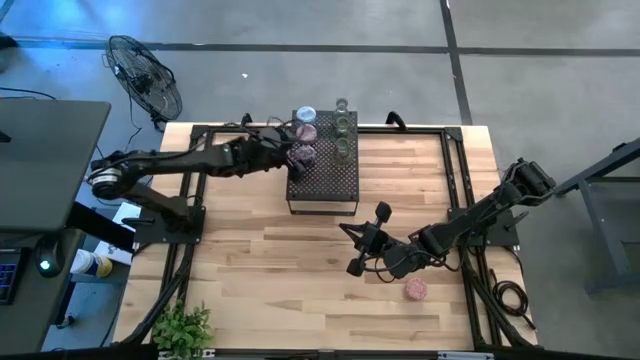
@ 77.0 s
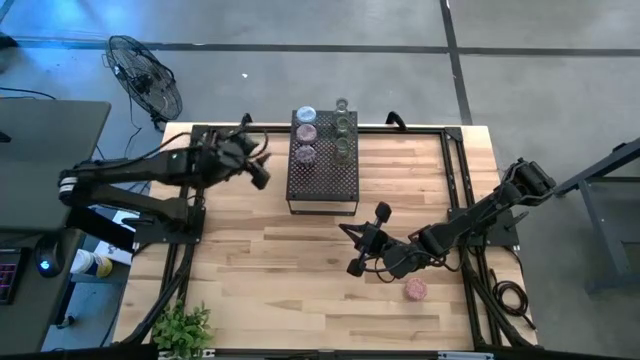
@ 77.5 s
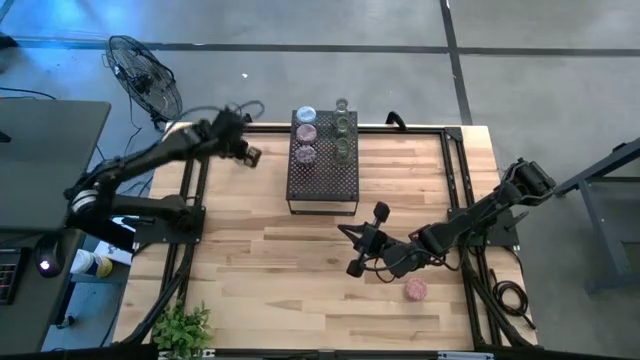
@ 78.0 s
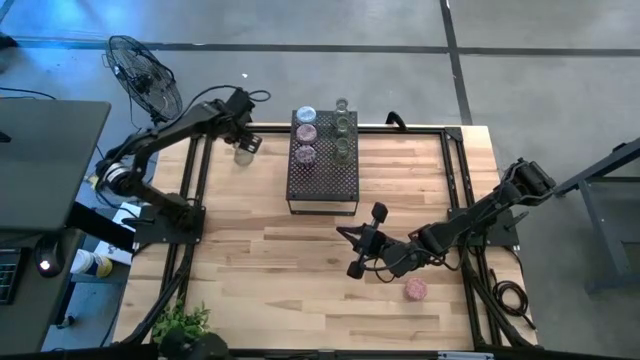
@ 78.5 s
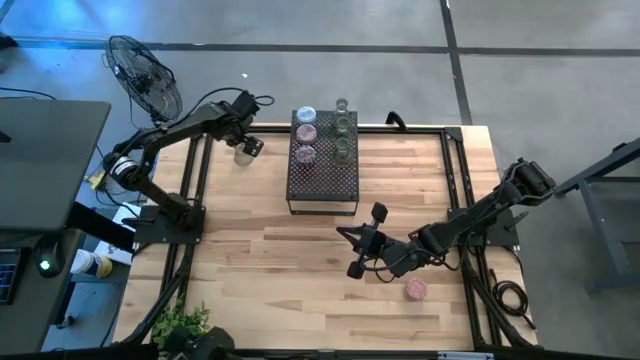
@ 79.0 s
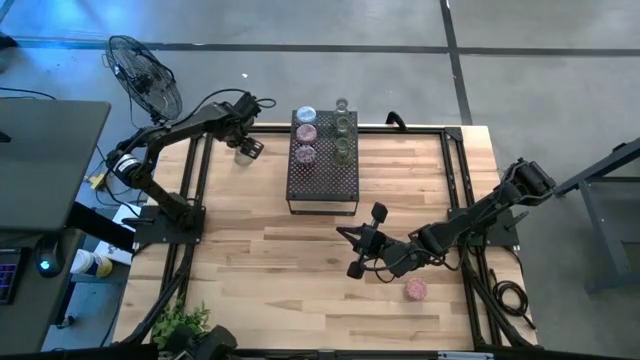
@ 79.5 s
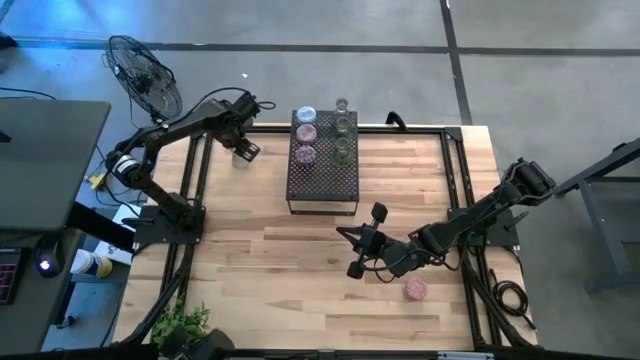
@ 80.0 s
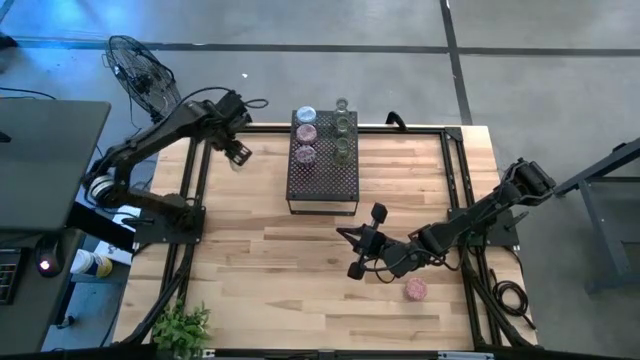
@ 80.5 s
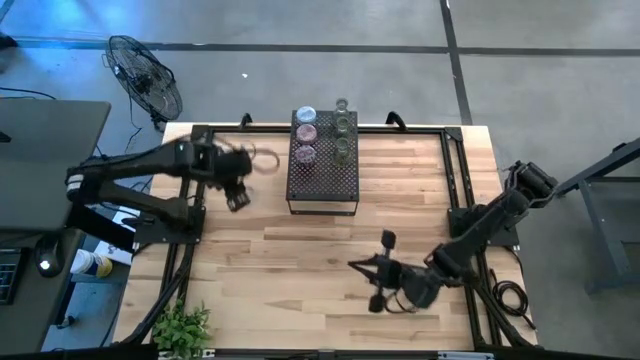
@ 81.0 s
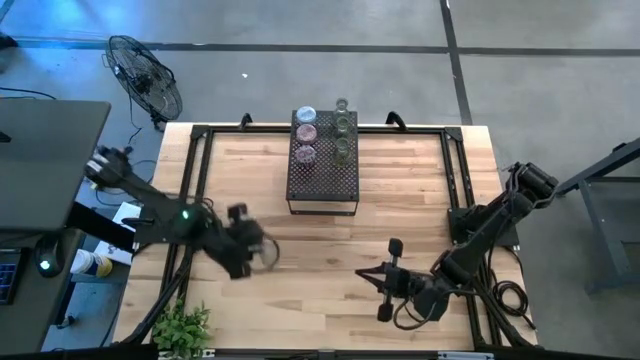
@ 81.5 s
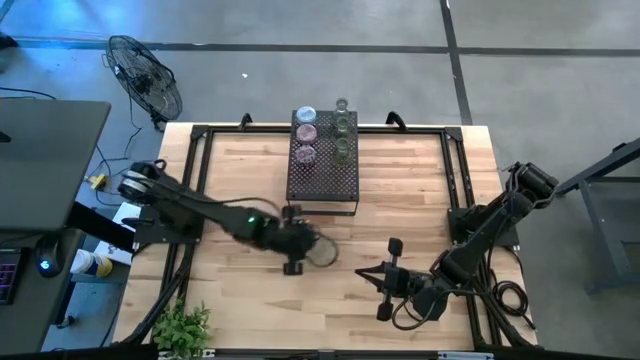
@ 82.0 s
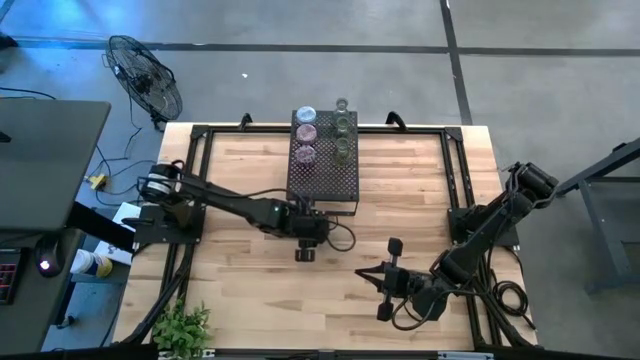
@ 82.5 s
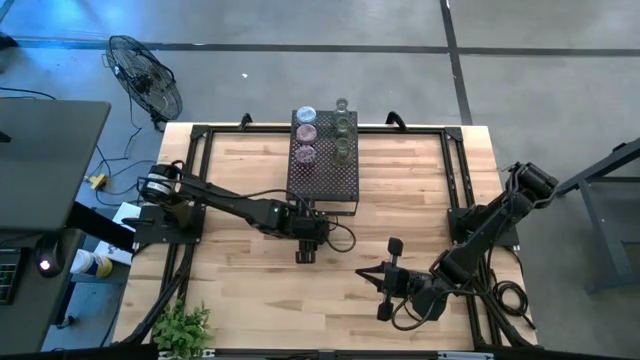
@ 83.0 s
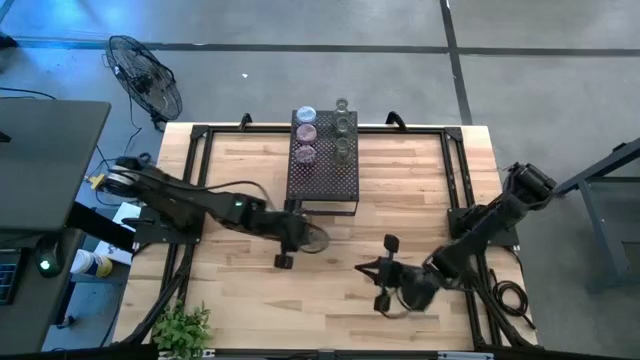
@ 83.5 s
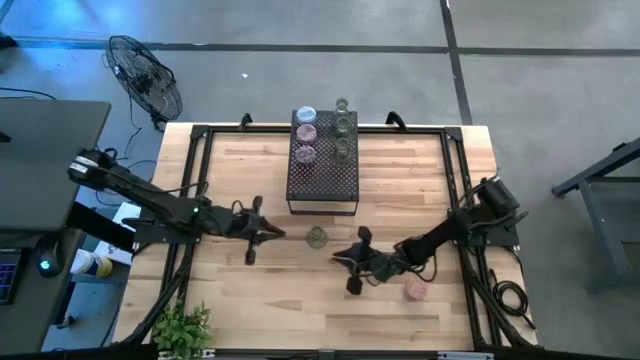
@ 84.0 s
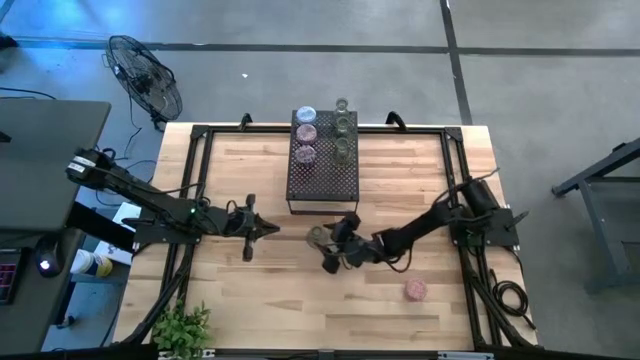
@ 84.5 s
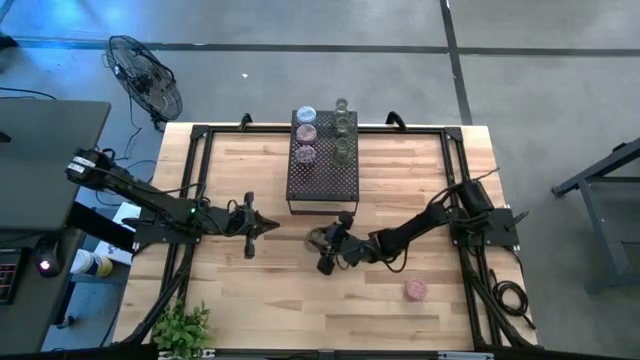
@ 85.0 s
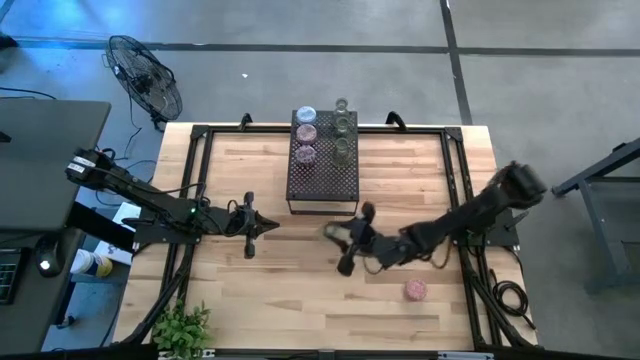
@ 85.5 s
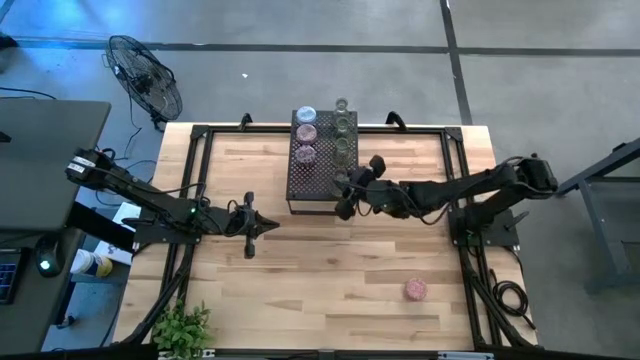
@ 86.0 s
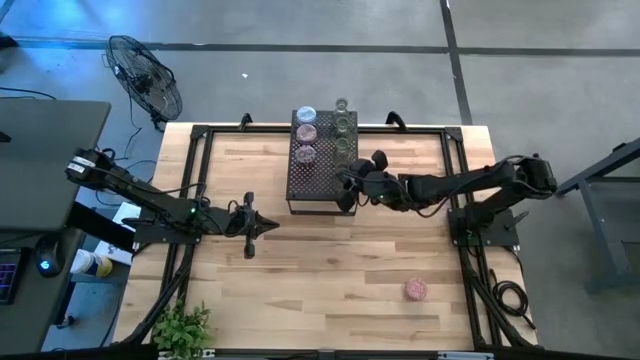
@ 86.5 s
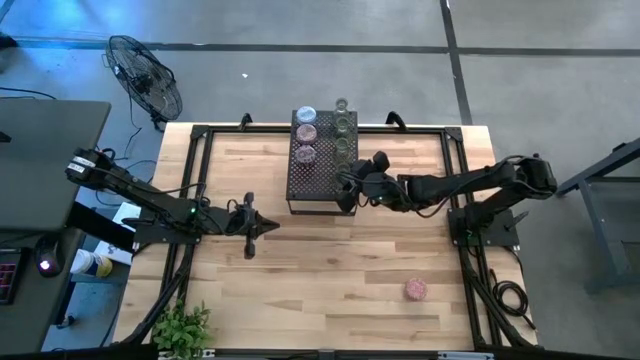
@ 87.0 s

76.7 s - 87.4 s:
Task: Pick & Place candle stick holders
Put the green glass candle holder on the shelf aligned with the other green glass candle holders

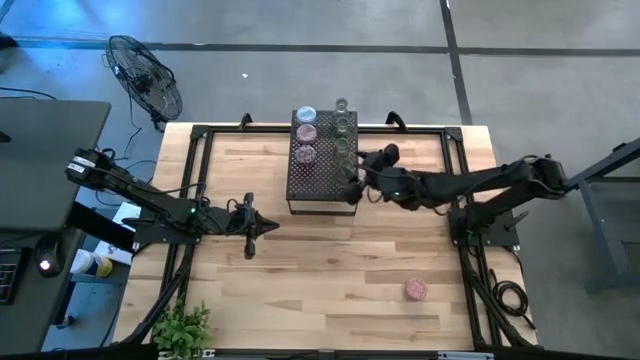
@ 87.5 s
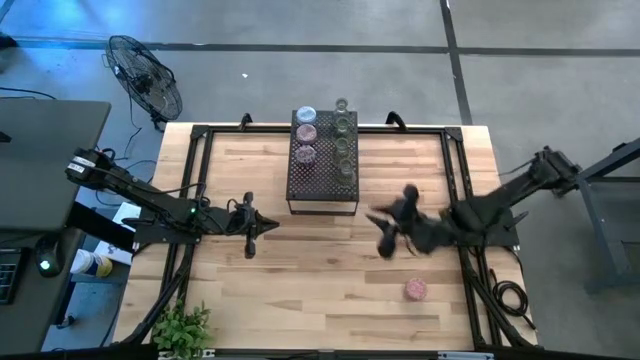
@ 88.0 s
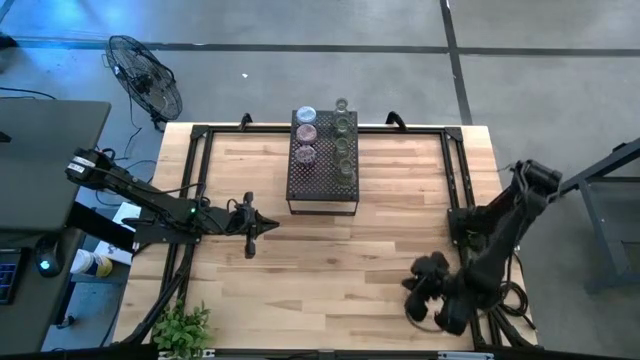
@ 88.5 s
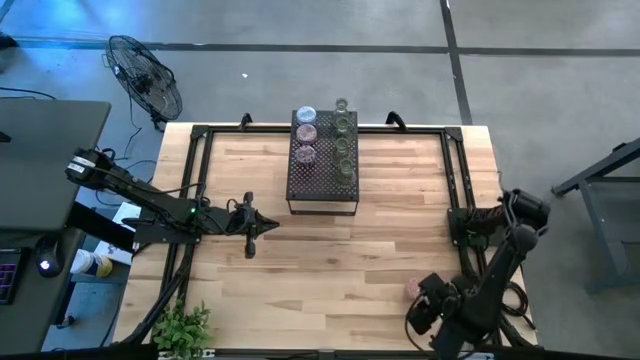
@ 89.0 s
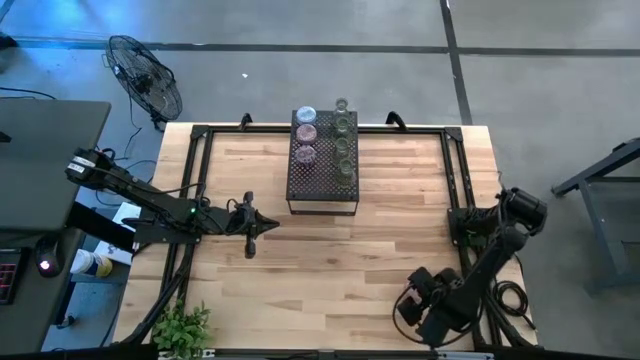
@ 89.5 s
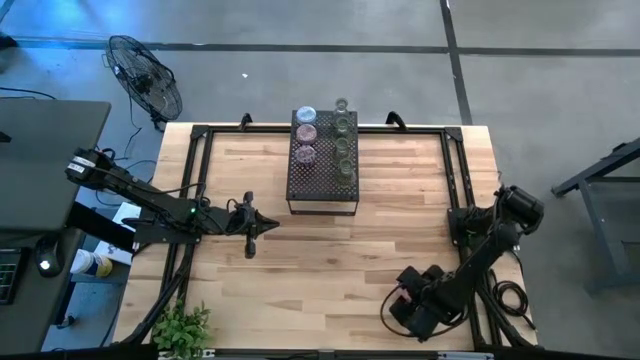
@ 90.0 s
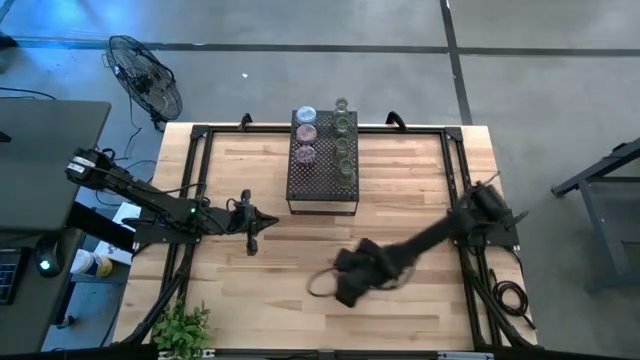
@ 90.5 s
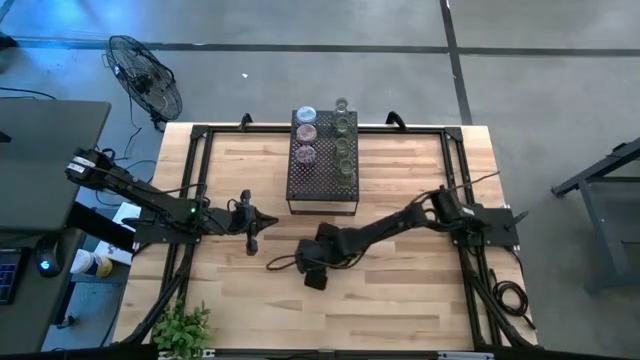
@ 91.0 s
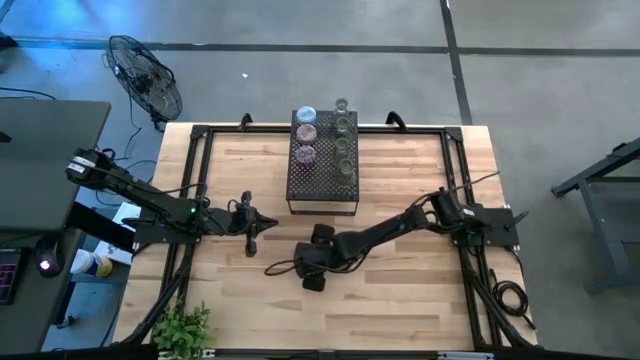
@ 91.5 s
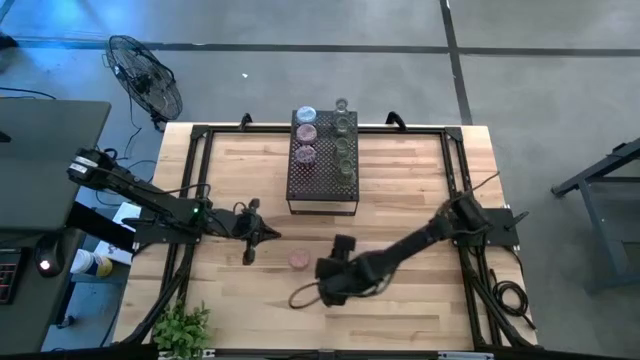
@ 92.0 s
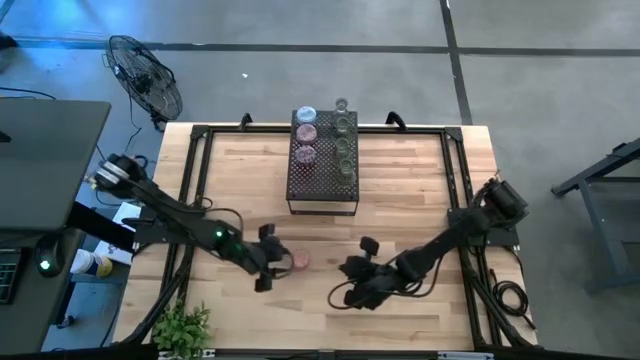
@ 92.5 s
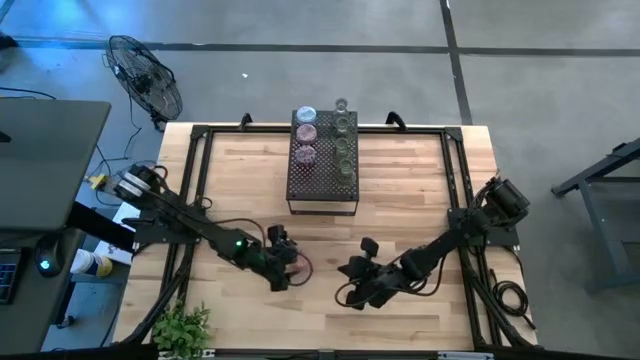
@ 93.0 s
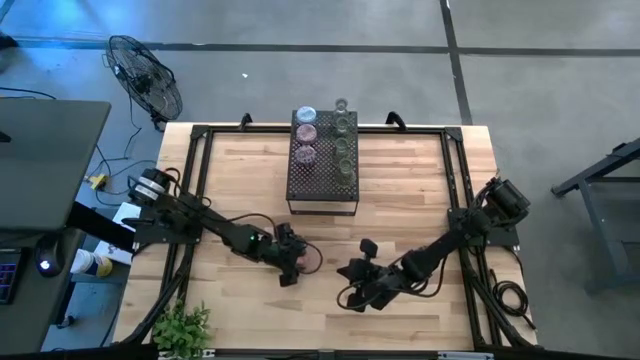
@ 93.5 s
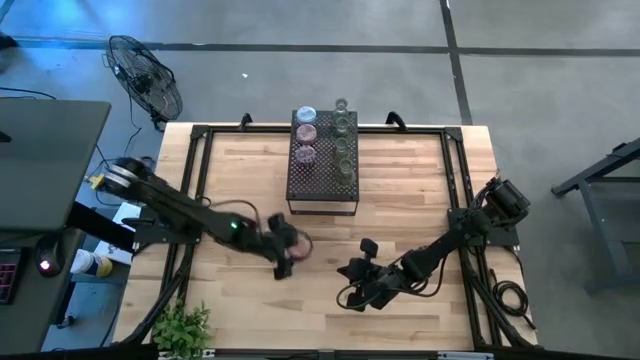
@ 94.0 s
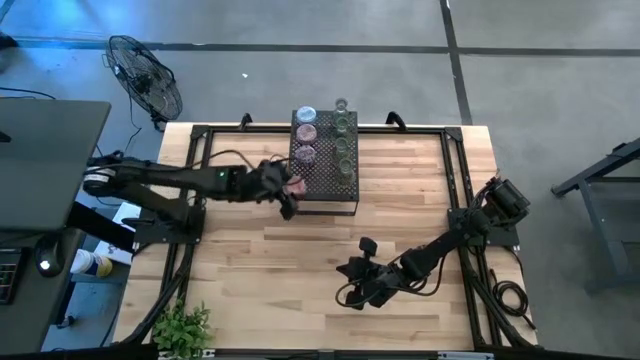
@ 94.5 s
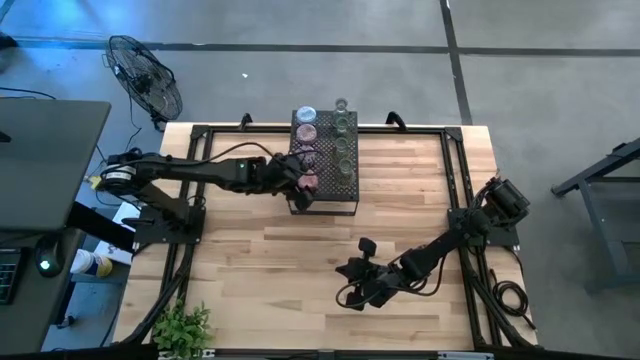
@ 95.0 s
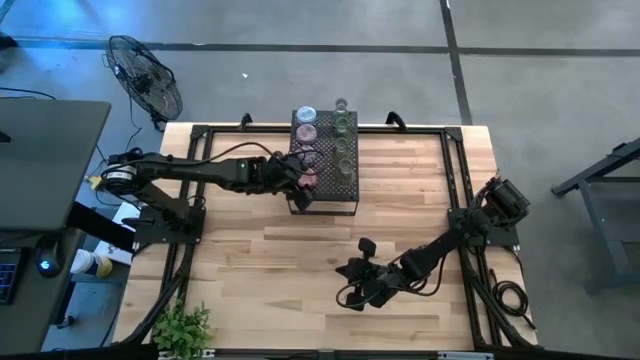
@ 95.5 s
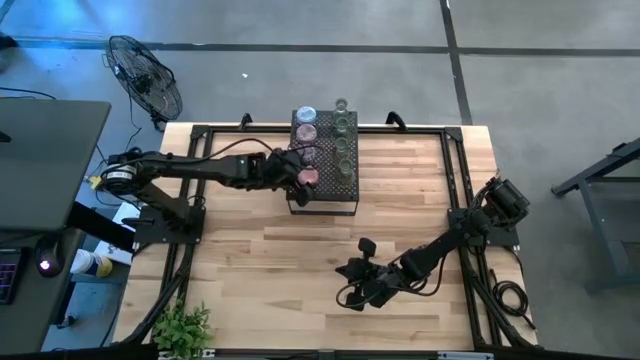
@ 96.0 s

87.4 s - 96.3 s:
Put the pink scented candle on the shelf aligned with the other black scented candle

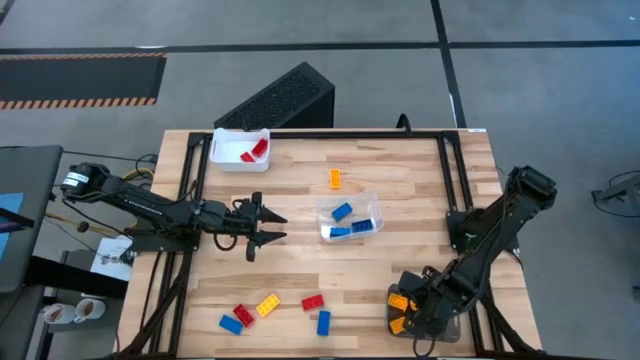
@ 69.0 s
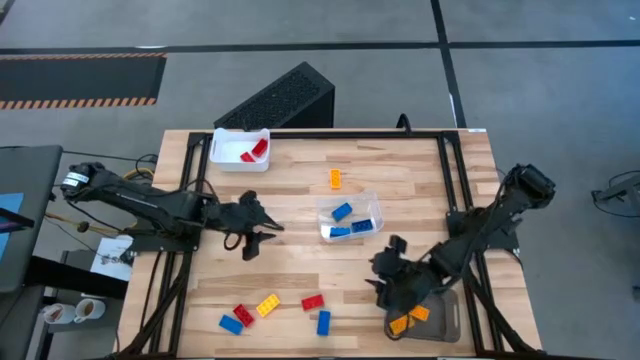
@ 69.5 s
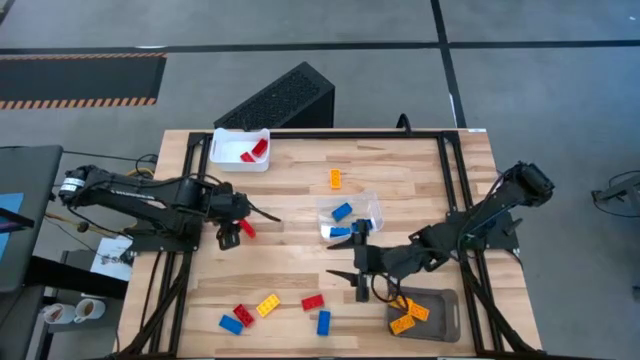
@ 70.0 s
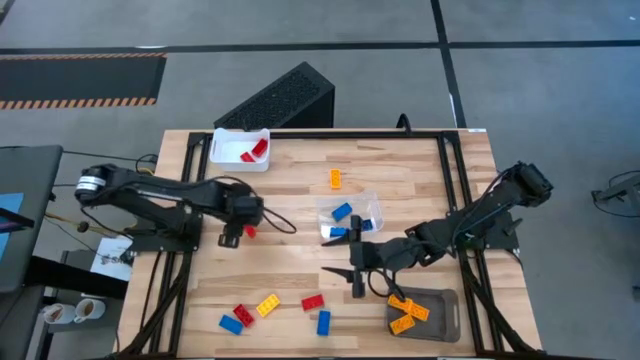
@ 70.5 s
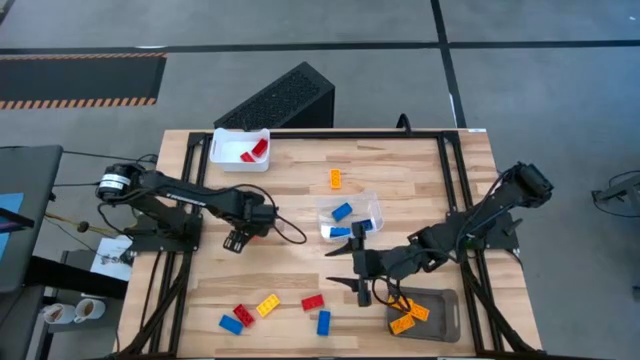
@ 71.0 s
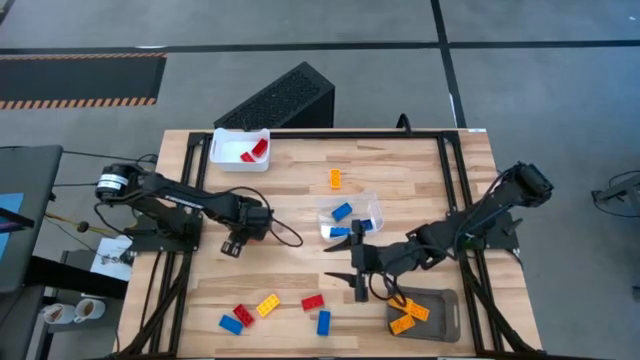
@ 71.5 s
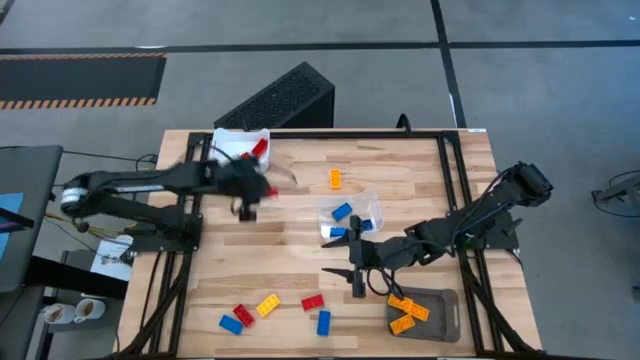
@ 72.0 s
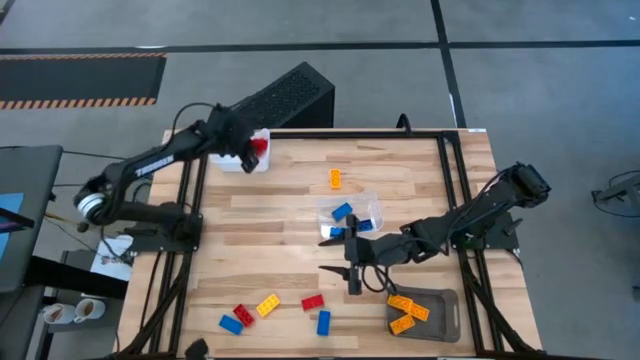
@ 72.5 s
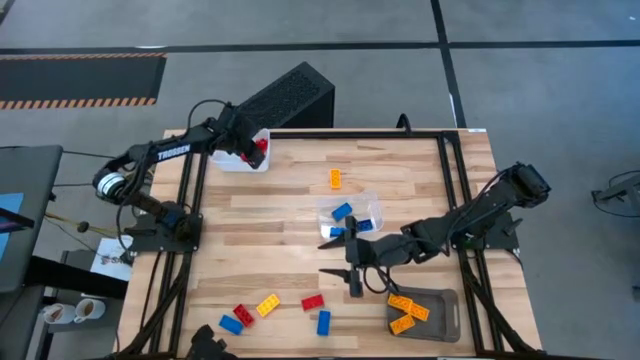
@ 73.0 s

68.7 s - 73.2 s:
Task: Sort & place blocks by color
Put the red game piece into the white bin
